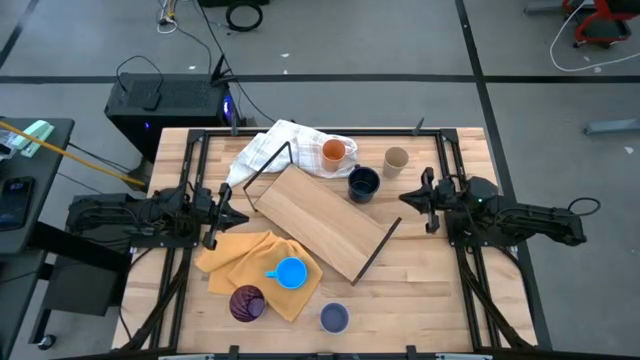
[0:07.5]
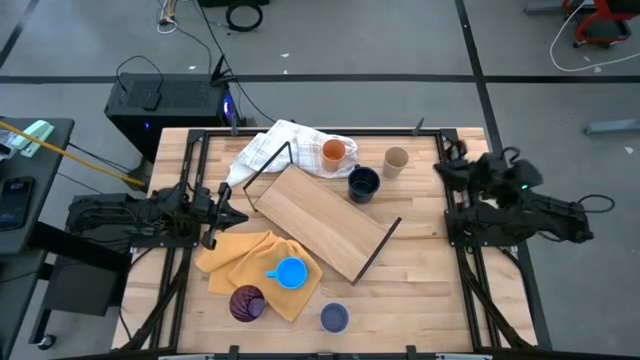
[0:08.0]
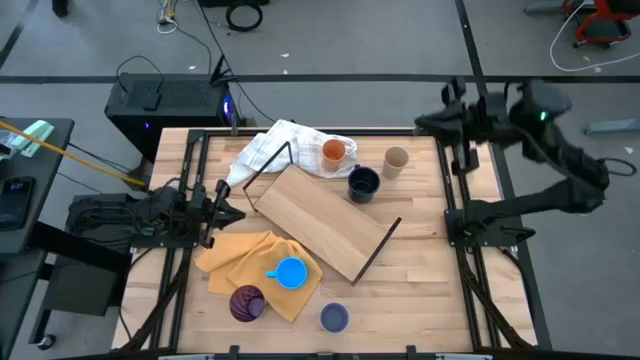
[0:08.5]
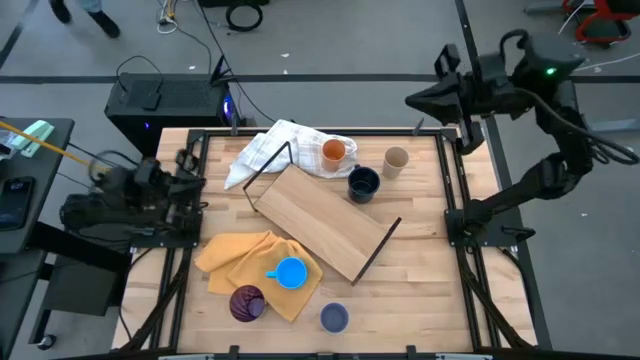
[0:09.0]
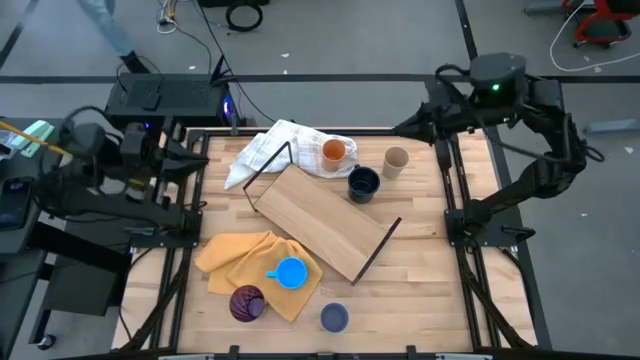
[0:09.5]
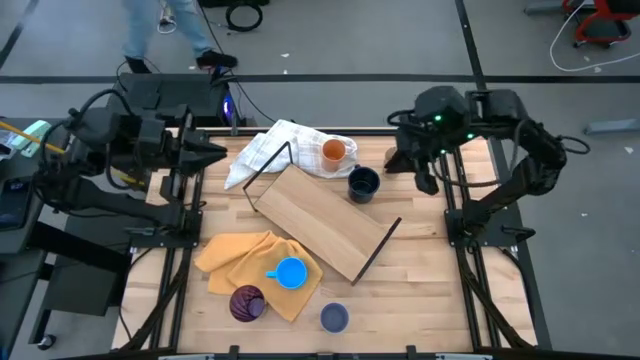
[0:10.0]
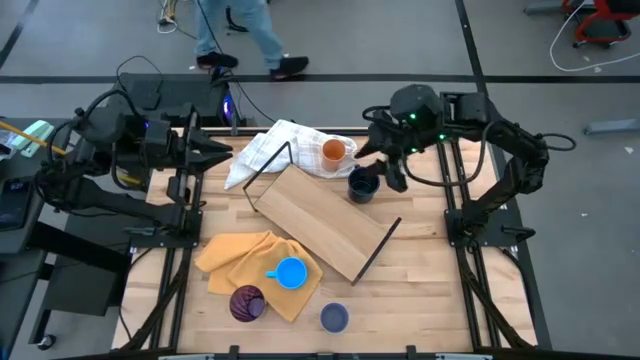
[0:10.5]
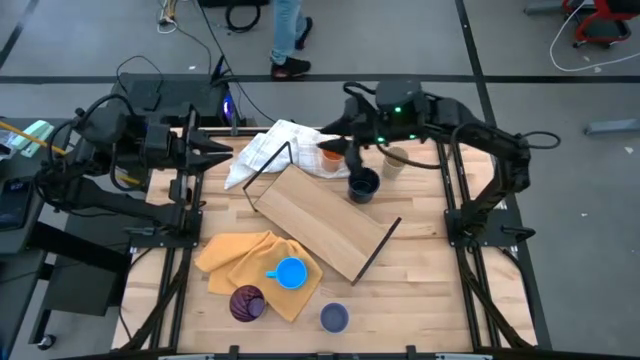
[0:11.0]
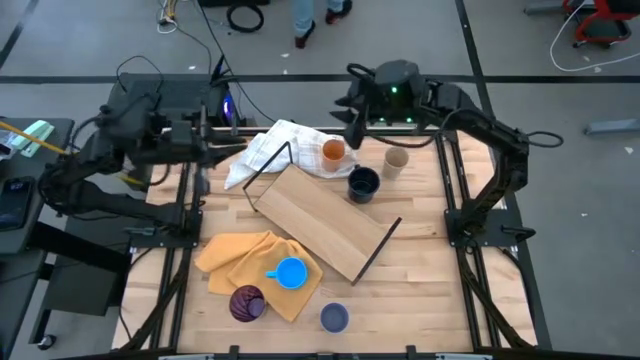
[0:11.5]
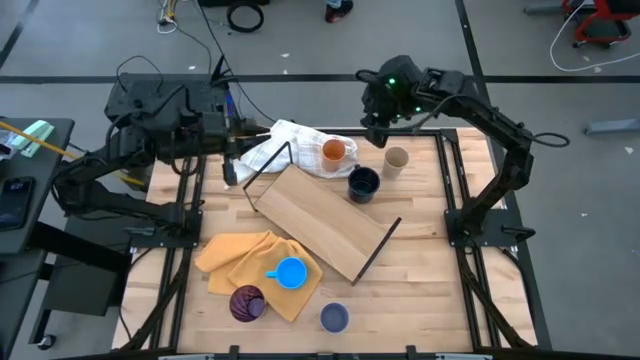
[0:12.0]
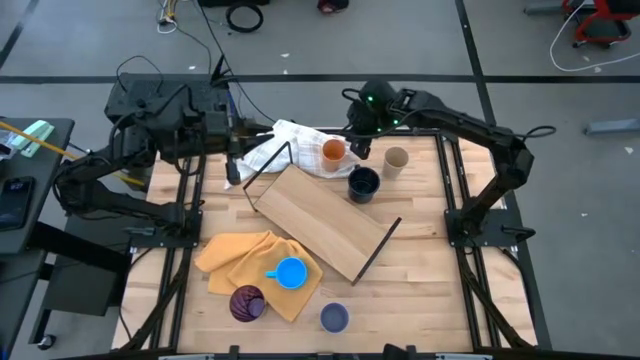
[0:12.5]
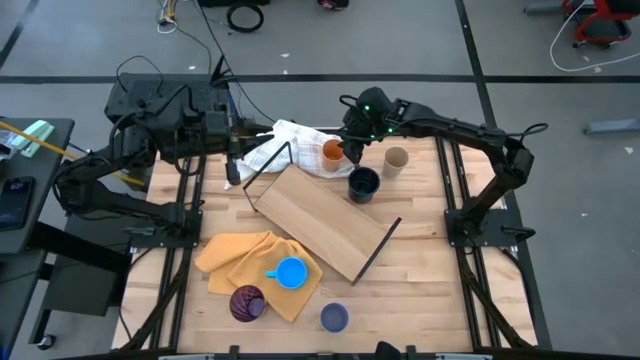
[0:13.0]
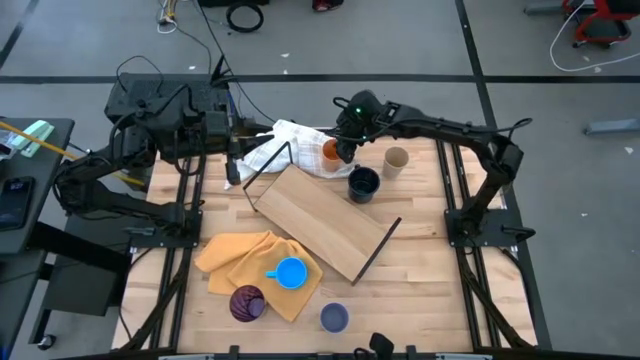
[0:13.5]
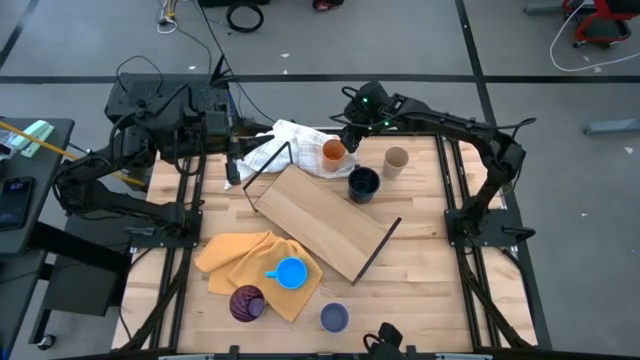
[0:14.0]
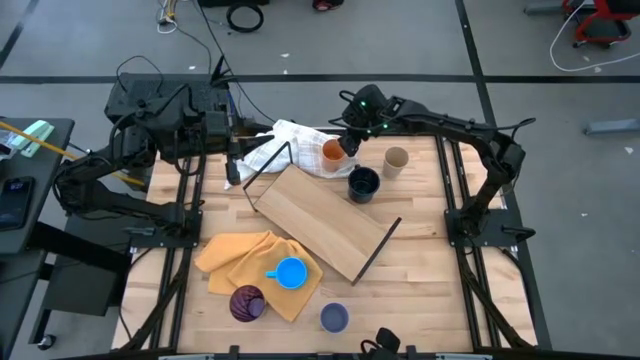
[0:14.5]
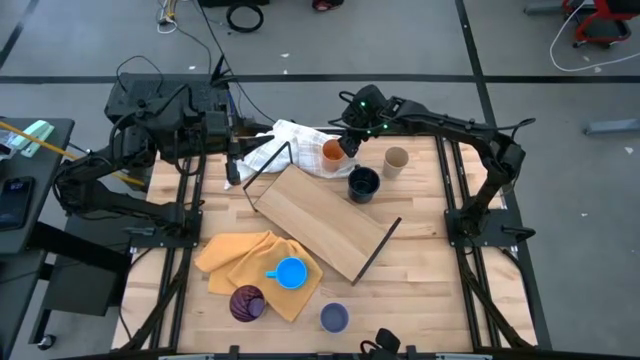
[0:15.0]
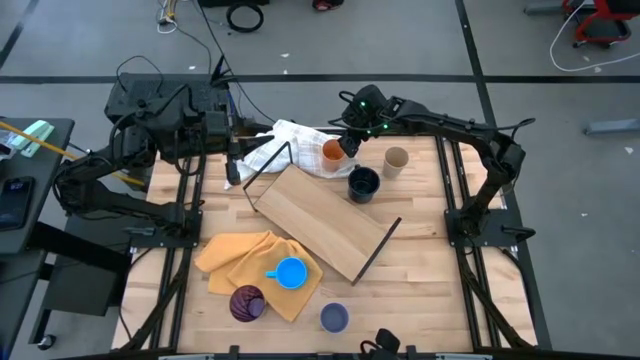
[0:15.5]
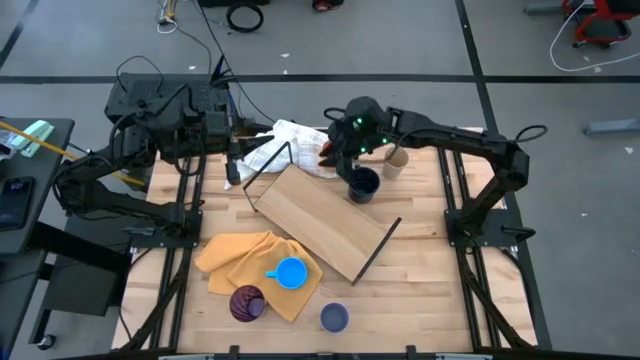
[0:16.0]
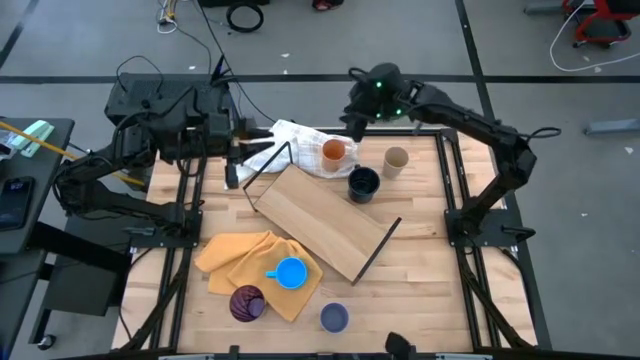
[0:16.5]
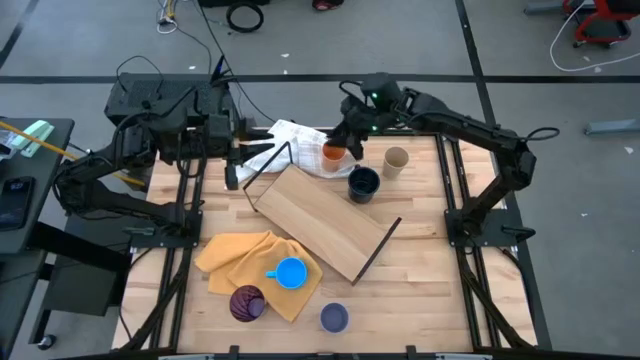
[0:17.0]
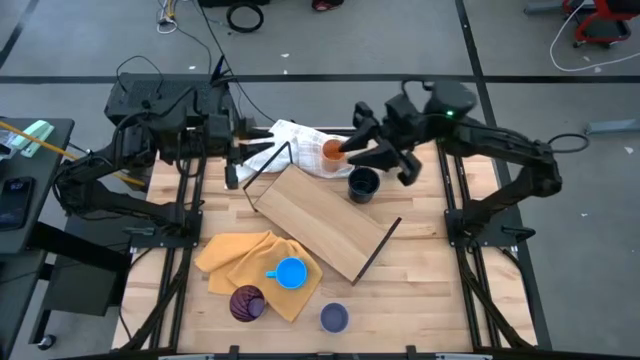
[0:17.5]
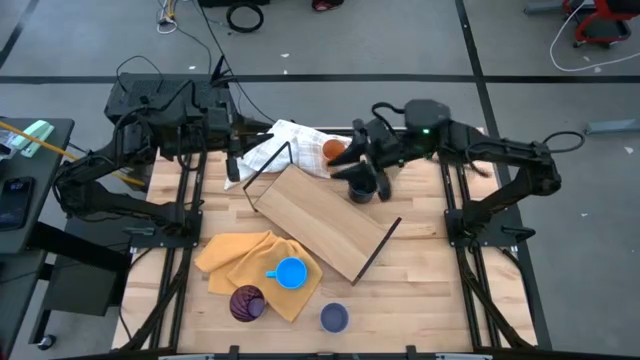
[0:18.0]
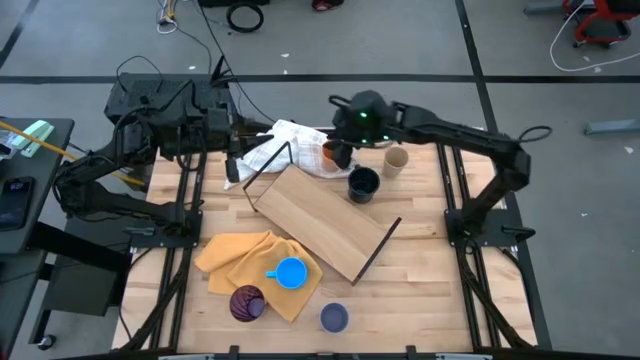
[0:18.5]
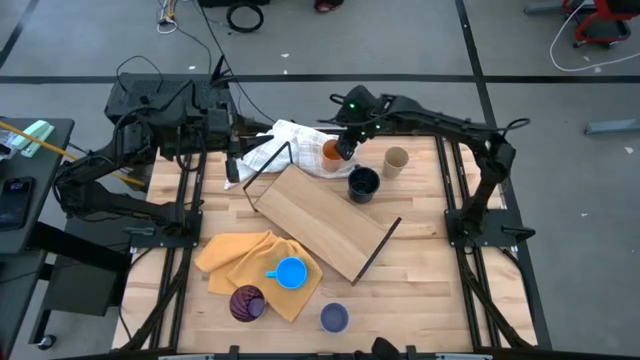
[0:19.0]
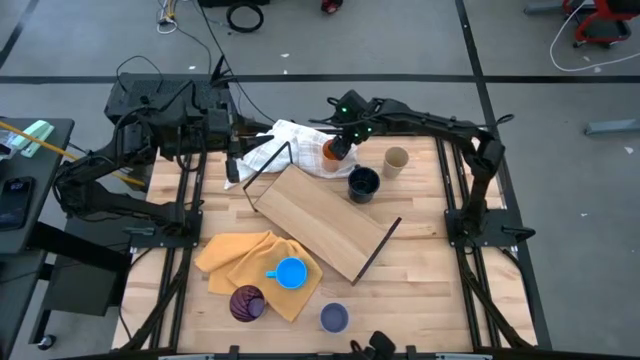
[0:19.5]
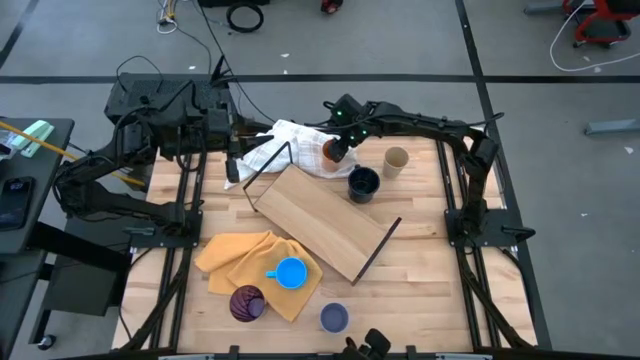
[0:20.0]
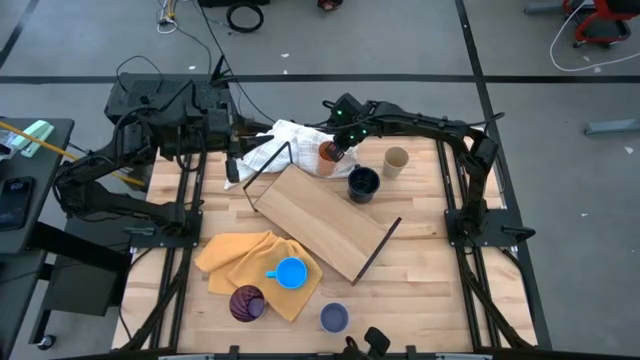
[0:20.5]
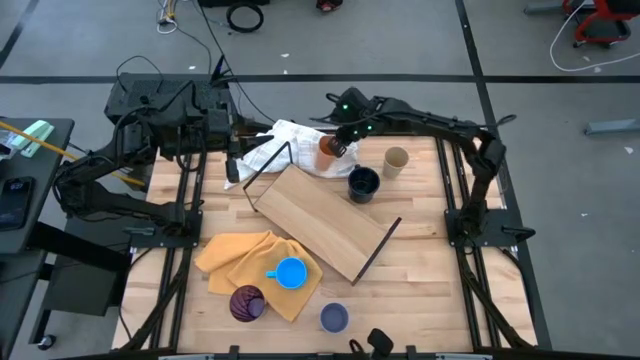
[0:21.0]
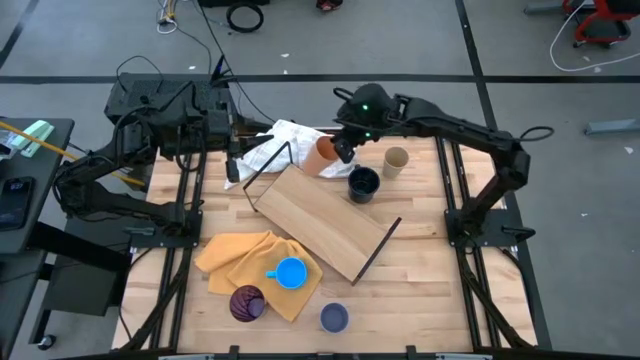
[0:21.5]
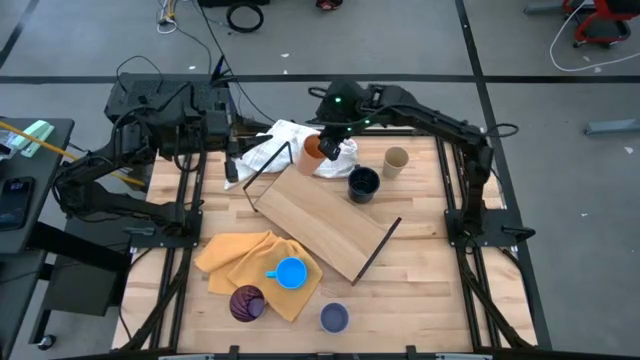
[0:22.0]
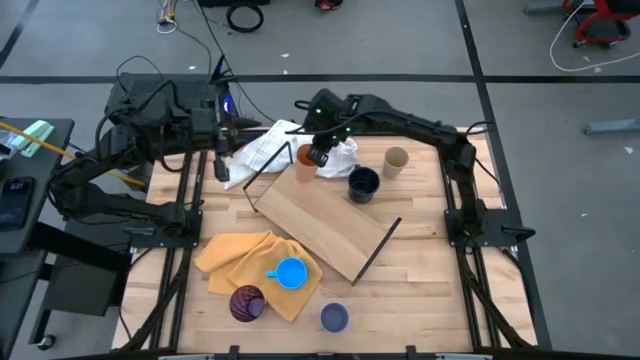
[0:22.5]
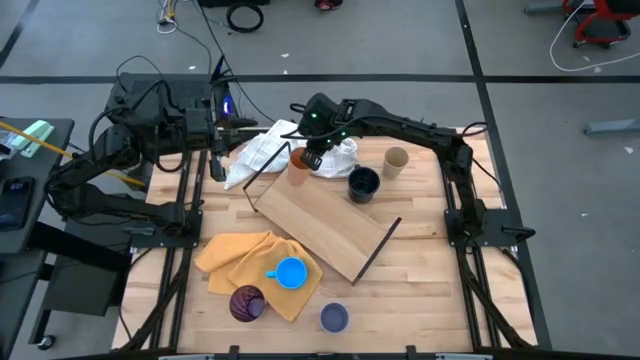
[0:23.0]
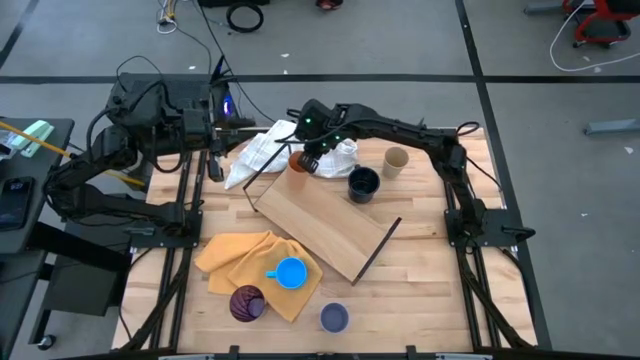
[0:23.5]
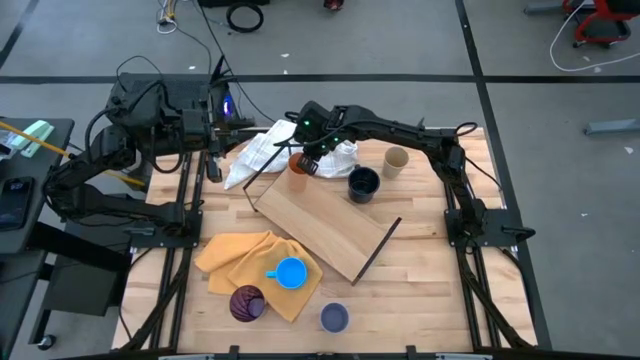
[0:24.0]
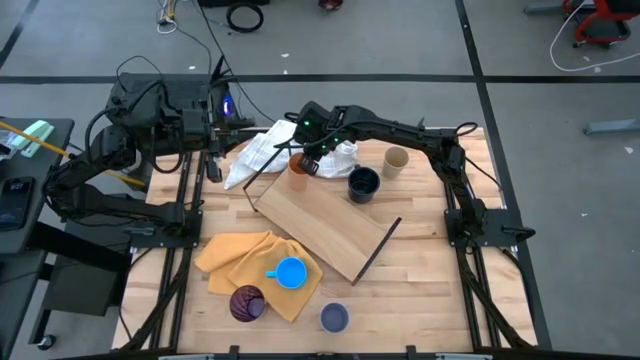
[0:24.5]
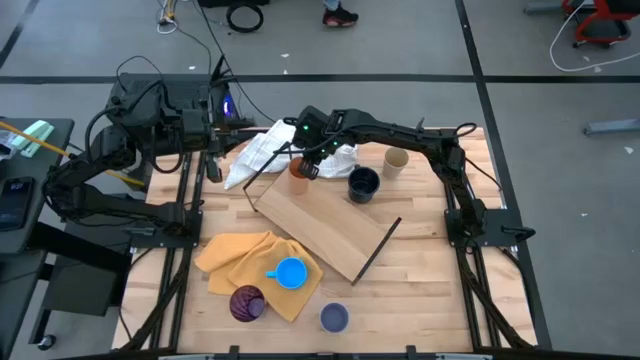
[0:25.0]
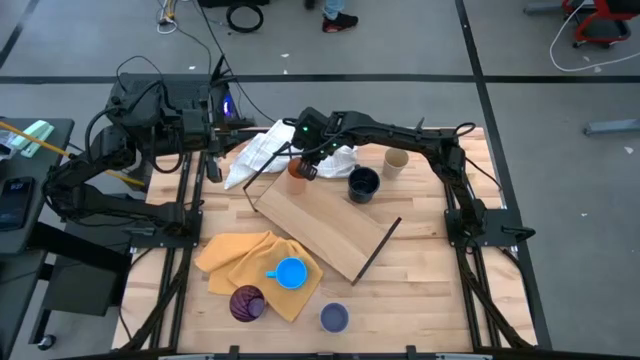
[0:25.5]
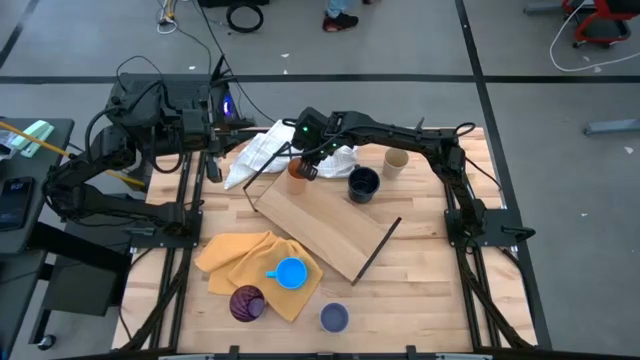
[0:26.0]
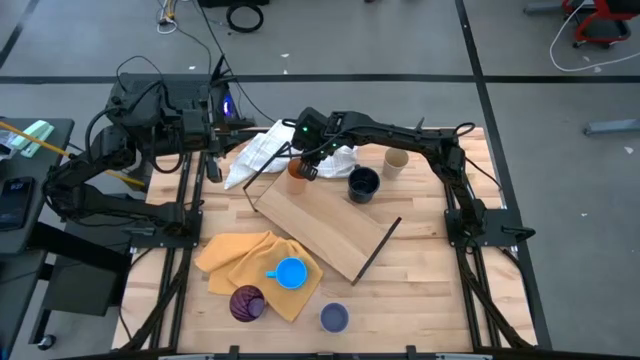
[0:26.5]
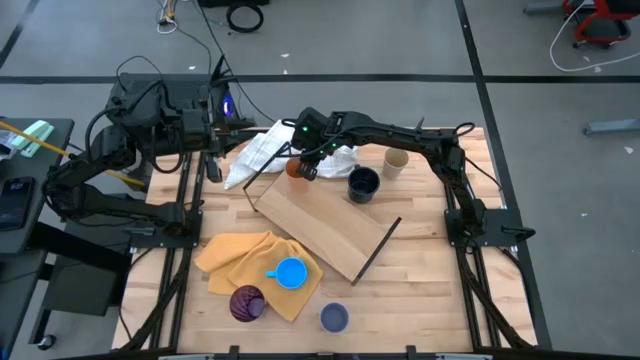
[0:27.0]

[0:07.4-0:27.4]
Task: Stack small to large cups/mugs on shelf
Put the orange cup on the shelf
